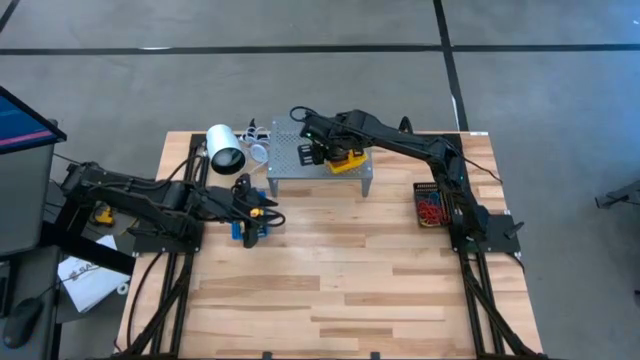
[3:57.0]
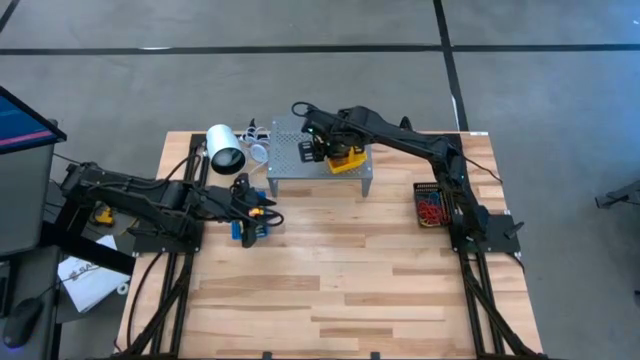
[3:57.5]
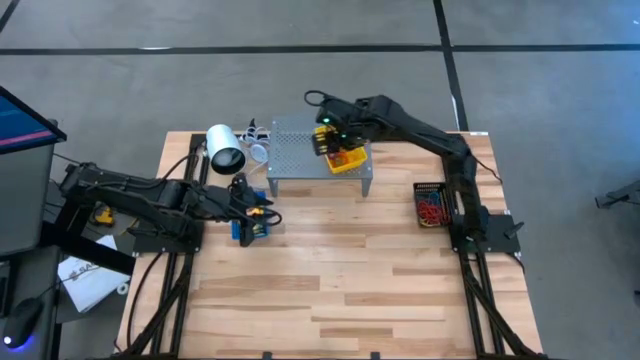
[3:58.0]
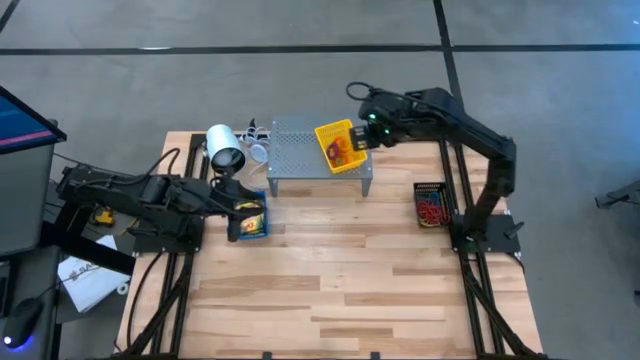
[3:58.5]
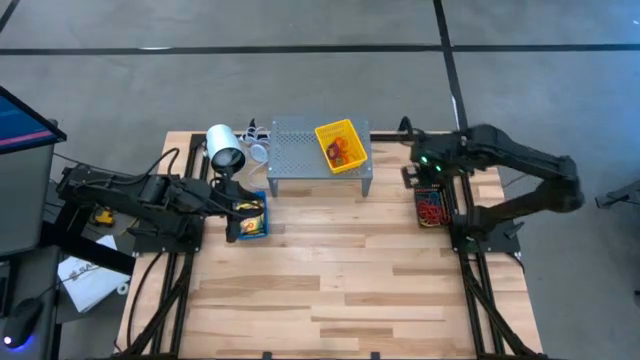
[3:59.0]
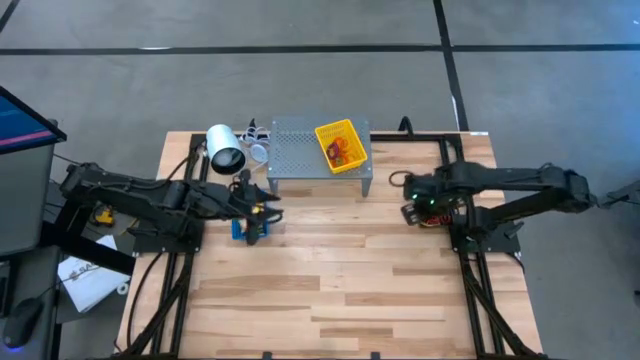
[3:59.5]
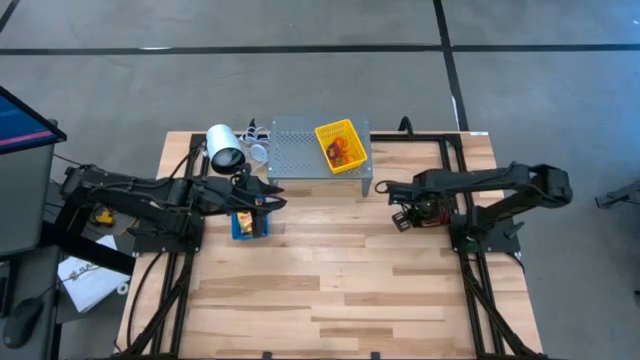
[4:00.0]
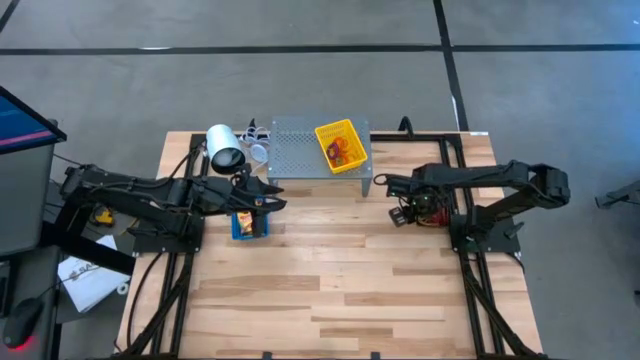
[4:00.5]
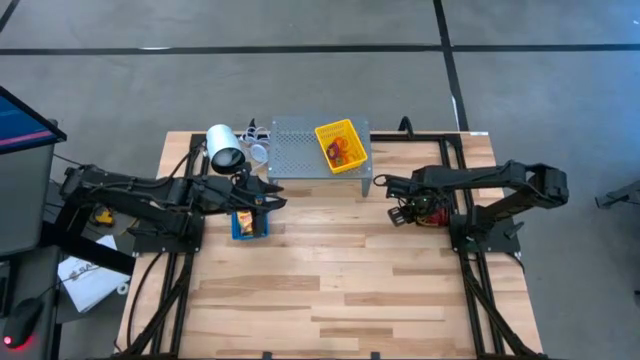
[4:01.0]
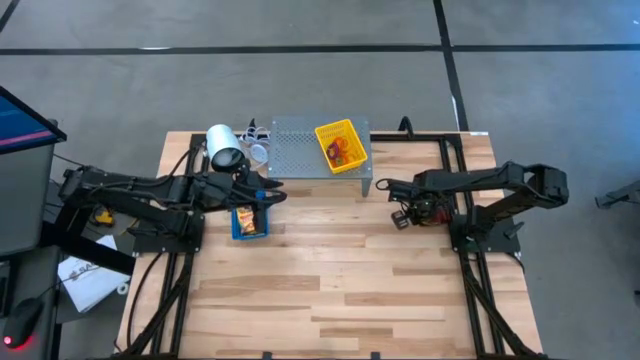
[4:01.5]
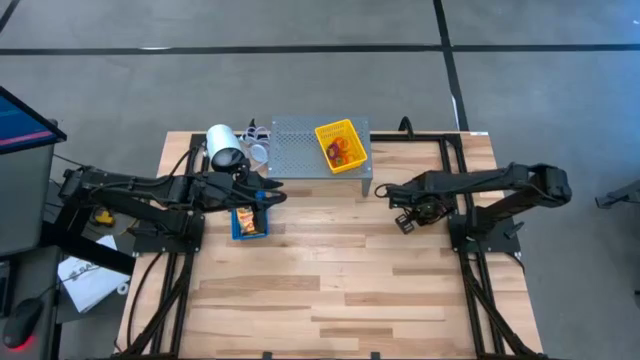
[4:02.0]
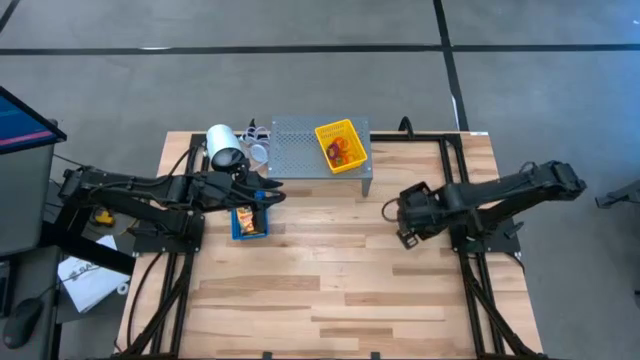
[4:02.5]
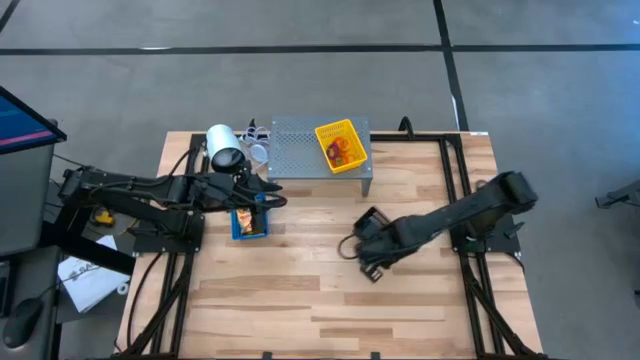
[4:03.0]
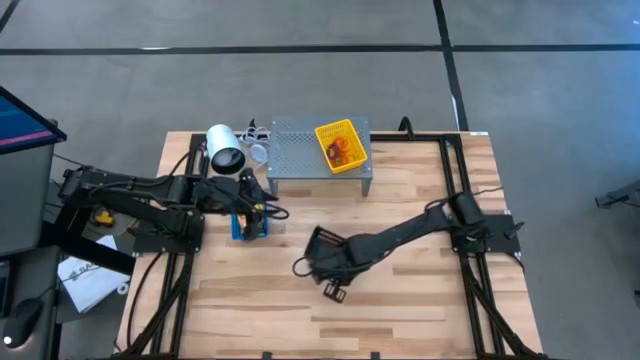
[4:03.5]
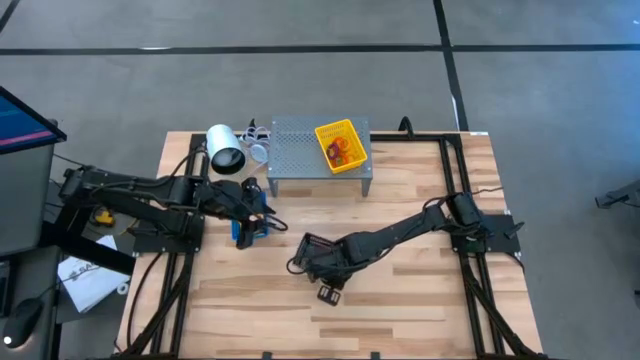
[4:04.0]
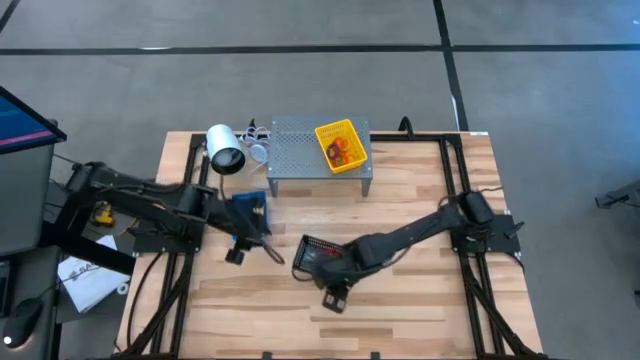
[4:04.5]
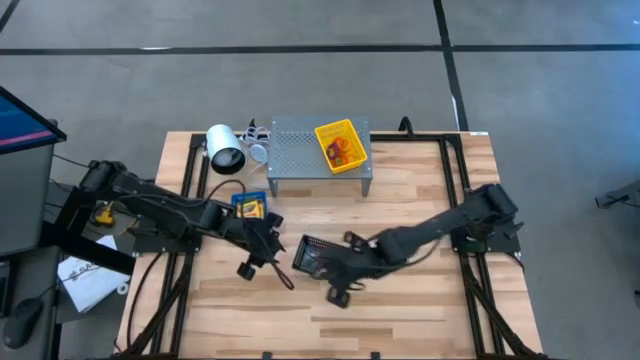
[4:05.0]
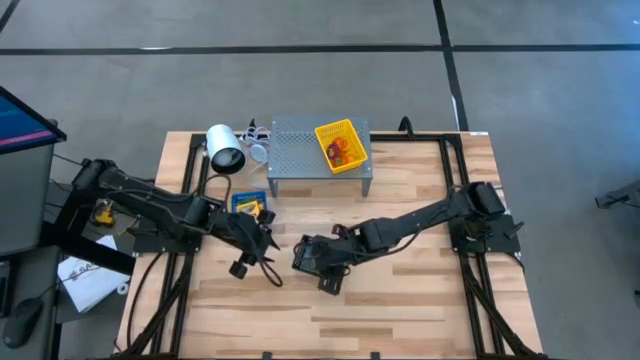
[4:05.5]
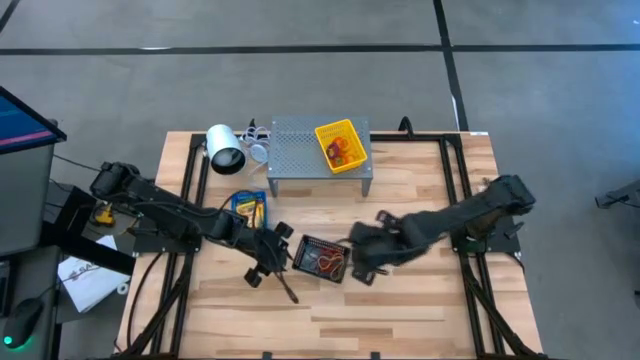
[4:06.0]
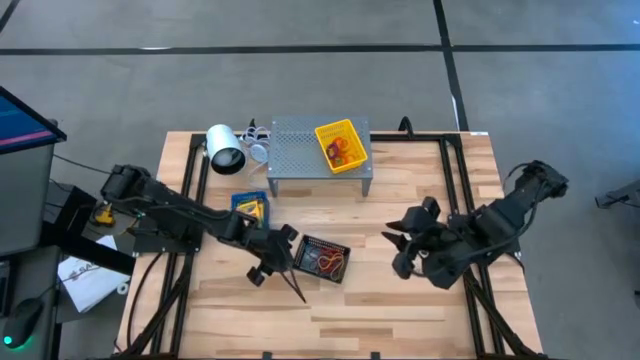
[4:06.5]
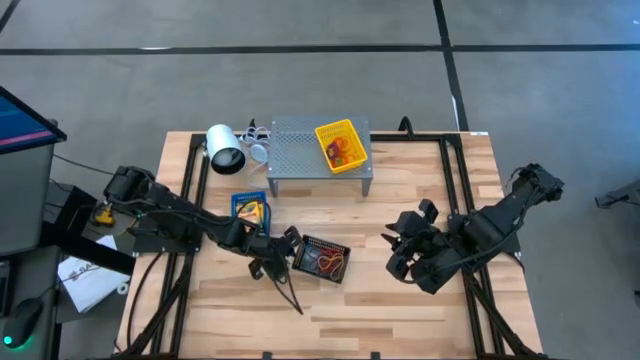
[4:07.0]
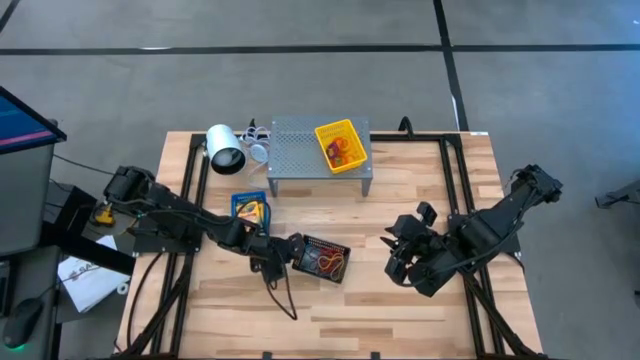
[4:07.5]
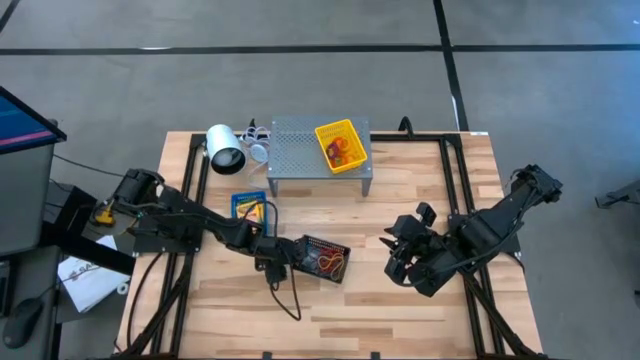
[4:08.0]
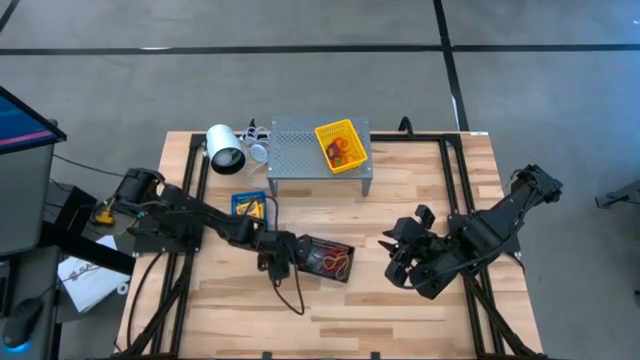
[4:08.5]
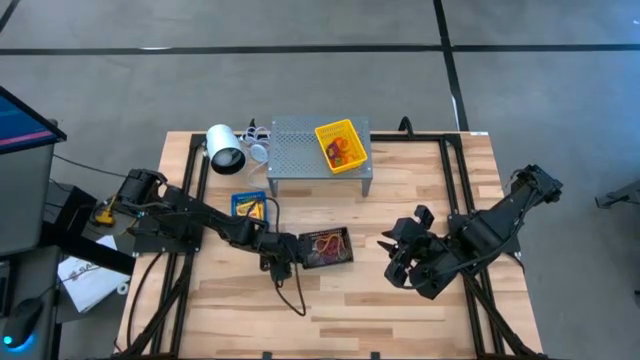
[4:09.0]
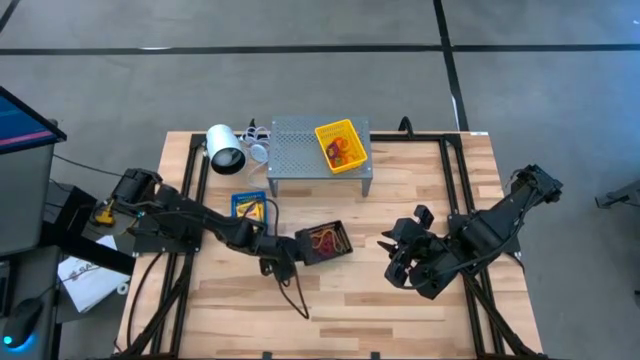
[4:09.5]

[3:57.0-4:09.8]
Task: Pick & Place Office Desk Supplies
Put the black bin with rubber bands on the shelf

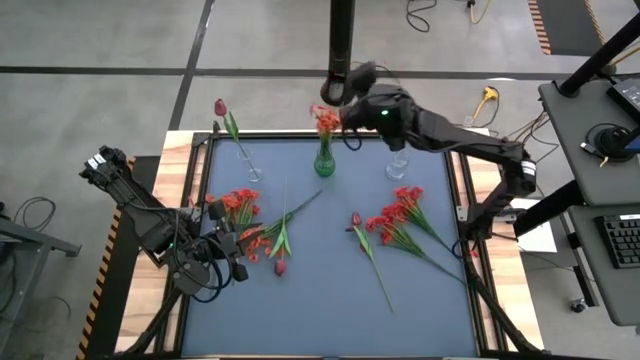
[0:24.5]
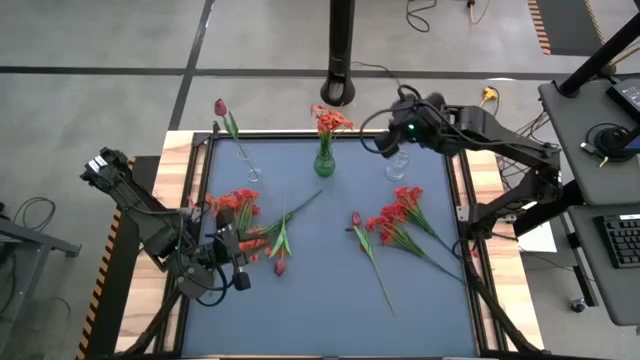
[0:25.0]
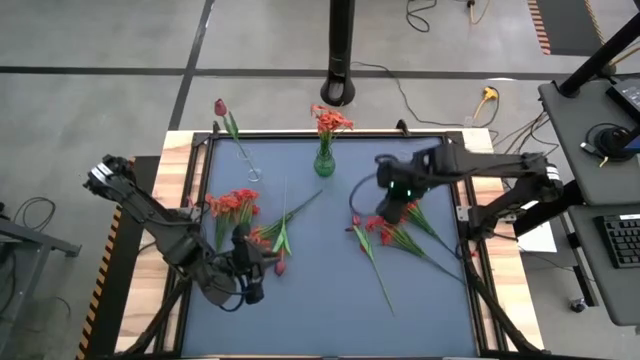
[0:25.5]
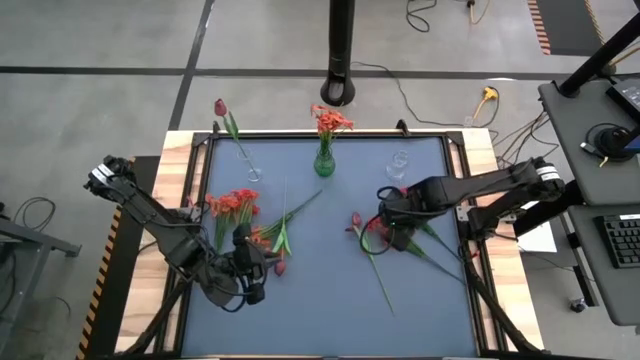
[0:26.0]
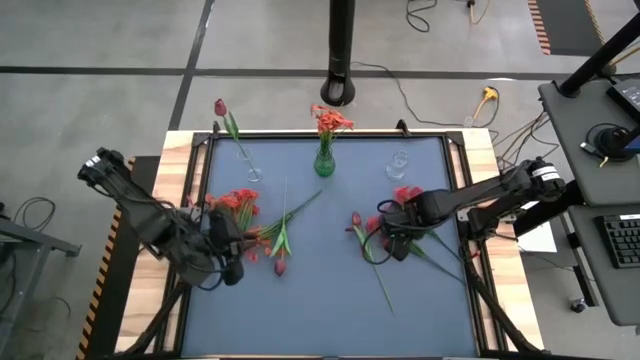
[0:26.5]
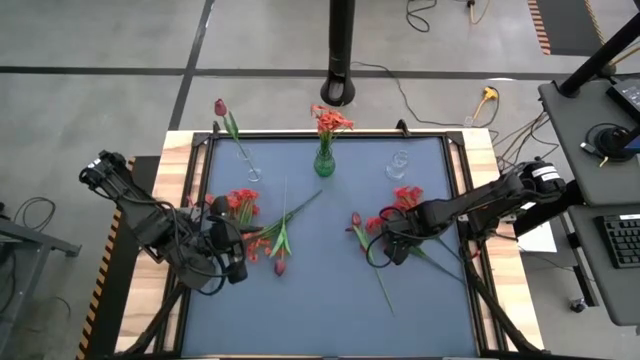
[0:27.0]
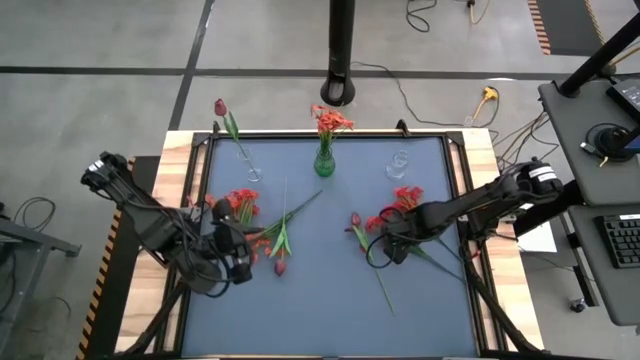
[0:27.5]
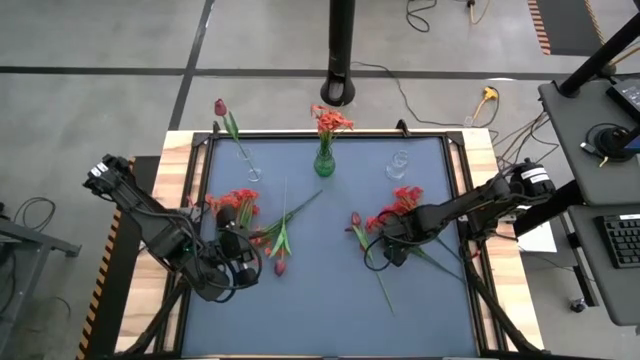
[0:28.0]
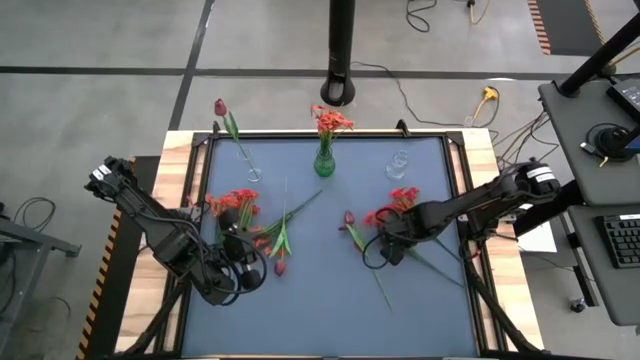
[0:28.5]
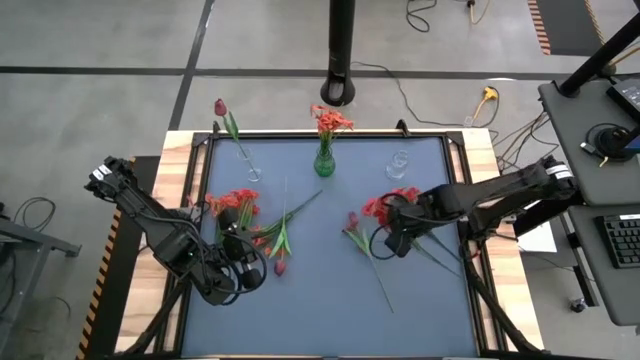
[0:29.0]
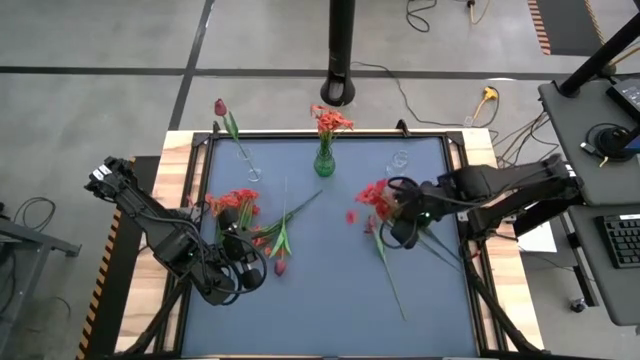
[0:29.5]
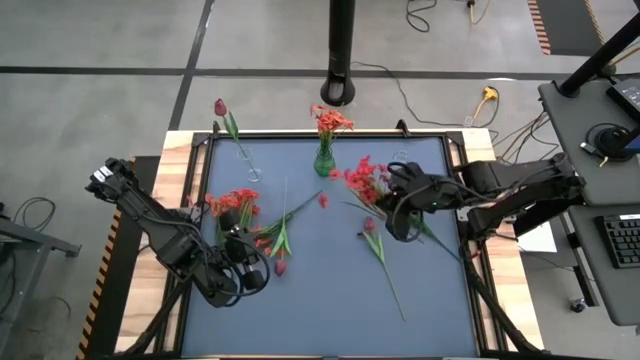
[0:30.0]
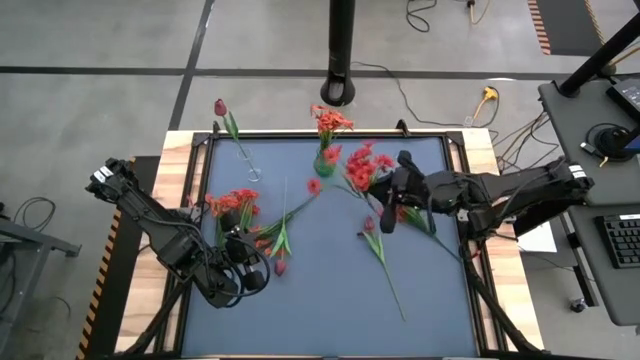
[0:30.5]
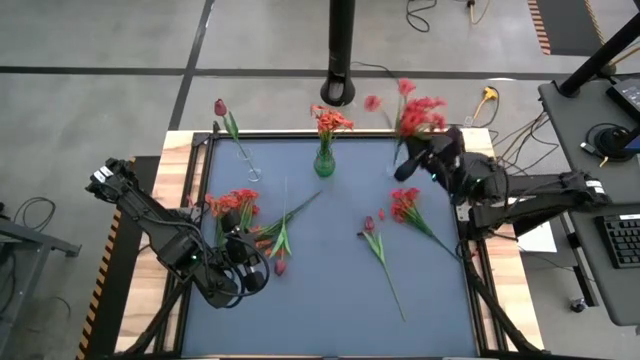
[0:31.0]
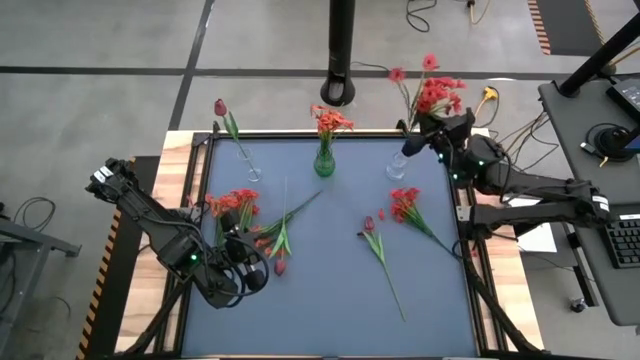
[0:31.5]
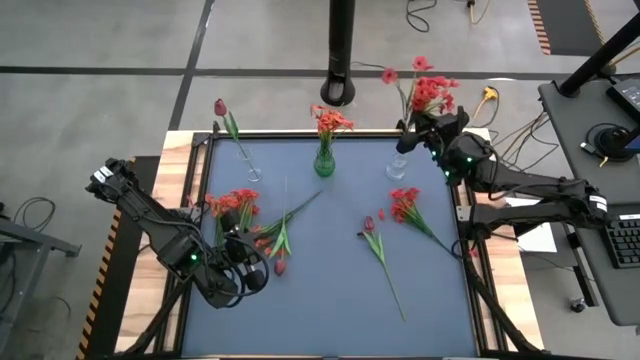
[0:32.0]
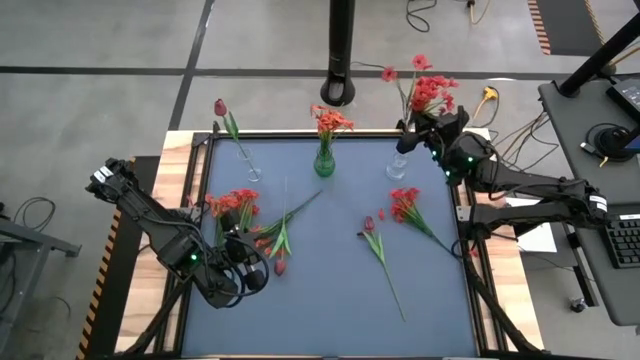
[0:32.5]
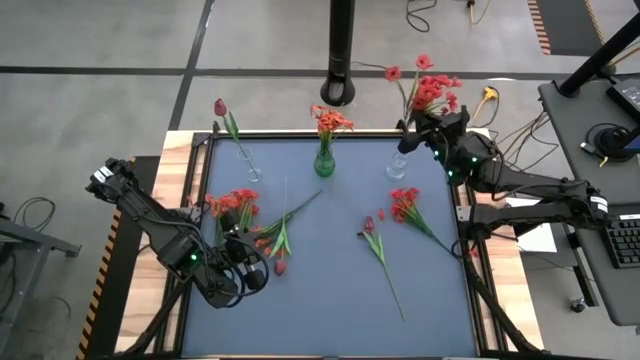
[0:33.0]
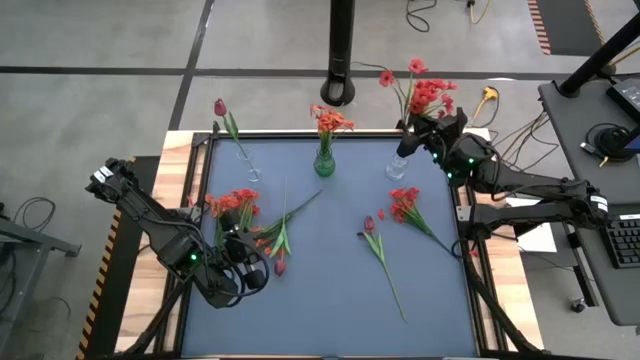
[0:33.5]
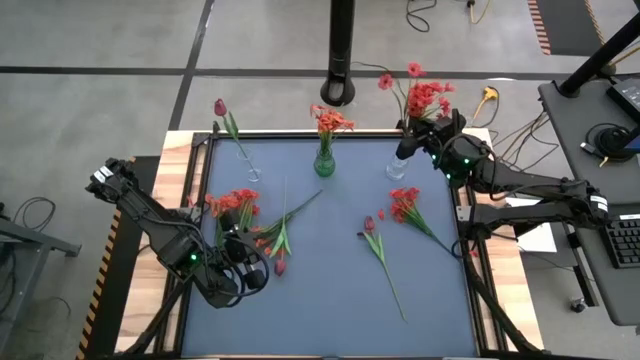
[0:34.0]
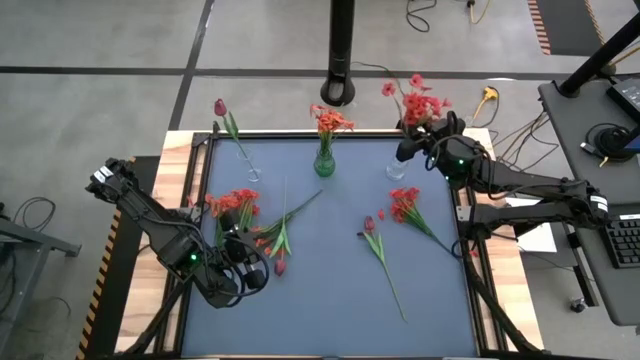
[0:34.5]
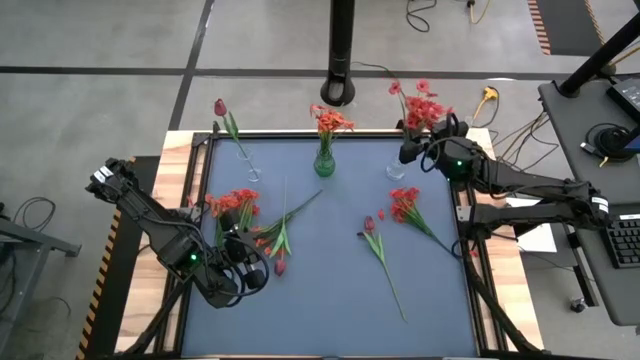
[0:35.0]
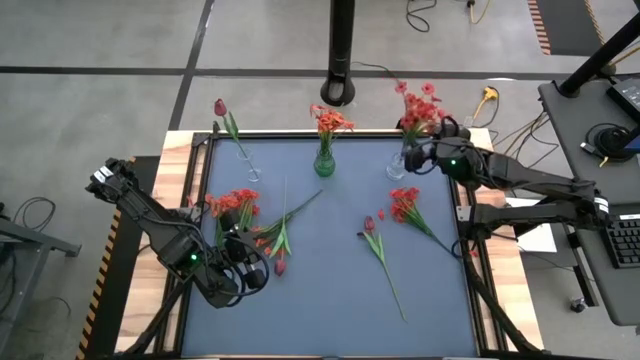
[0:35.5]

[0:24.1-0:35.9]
Task: Sort flowers into vase by color
Put the middle red flowers into the right transparent vase
